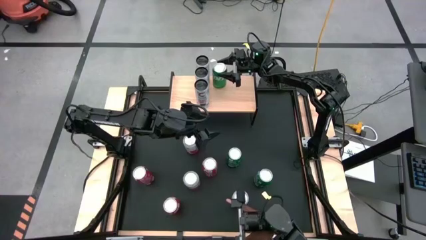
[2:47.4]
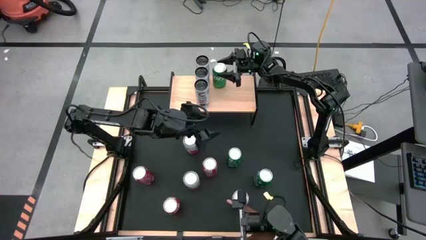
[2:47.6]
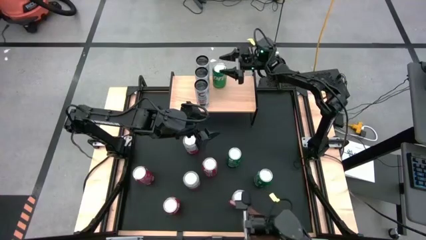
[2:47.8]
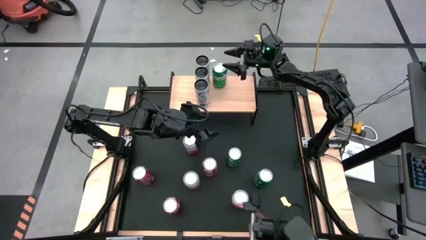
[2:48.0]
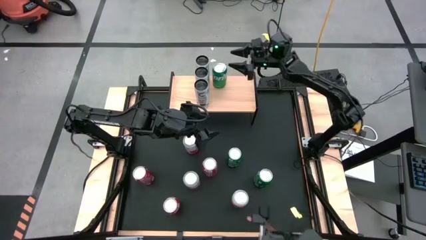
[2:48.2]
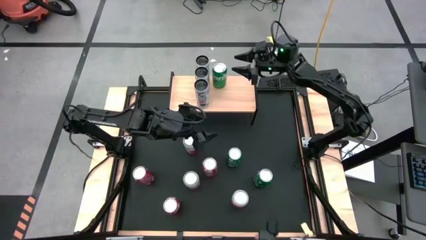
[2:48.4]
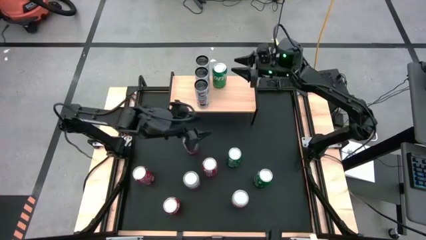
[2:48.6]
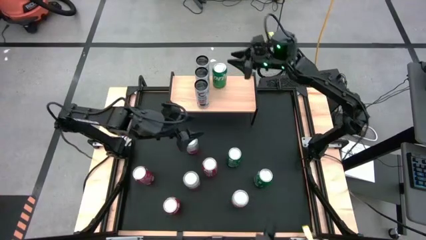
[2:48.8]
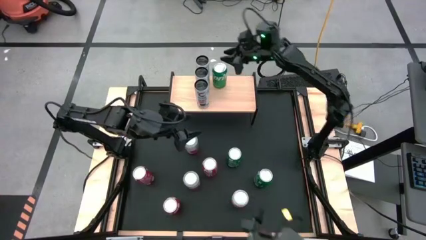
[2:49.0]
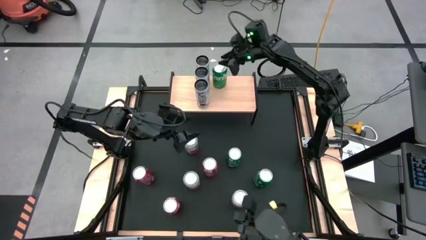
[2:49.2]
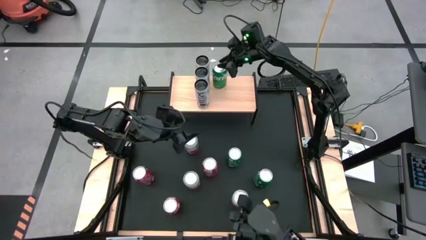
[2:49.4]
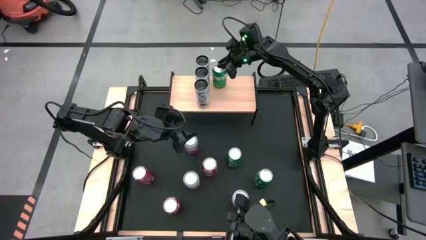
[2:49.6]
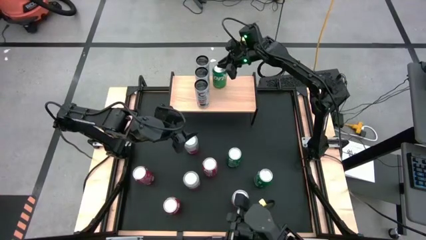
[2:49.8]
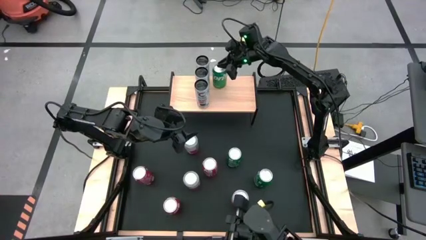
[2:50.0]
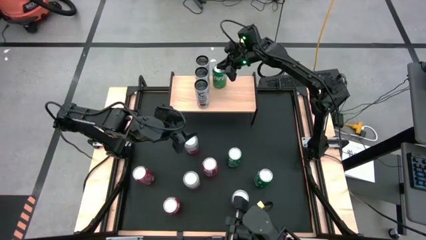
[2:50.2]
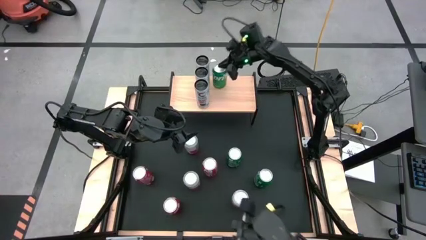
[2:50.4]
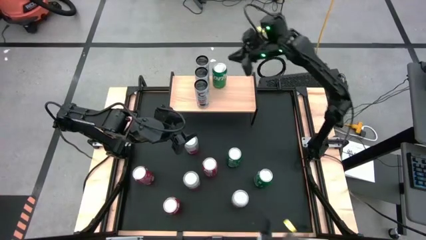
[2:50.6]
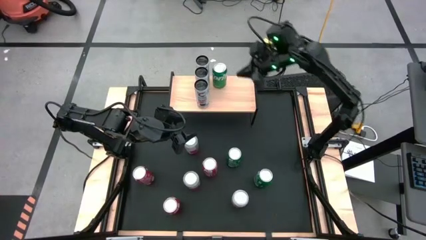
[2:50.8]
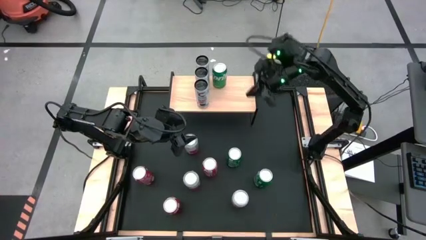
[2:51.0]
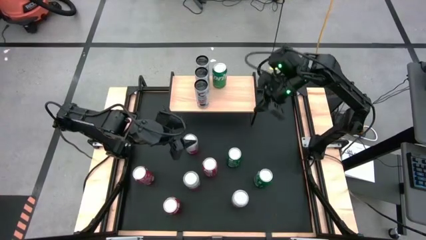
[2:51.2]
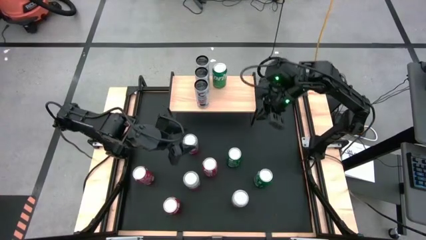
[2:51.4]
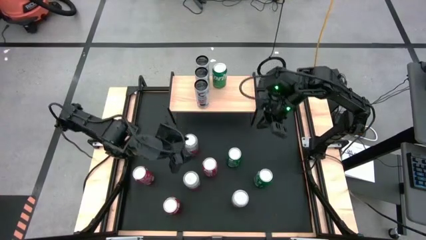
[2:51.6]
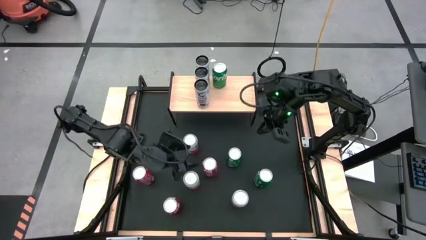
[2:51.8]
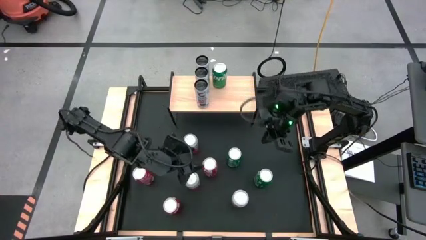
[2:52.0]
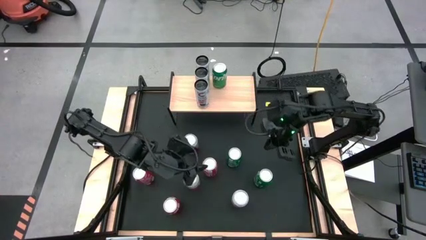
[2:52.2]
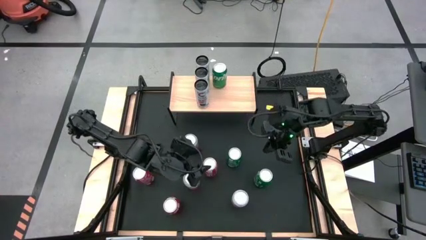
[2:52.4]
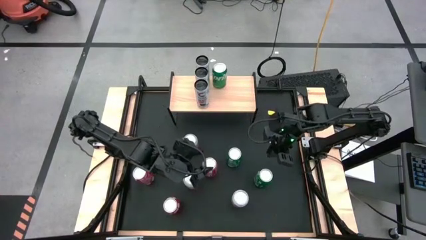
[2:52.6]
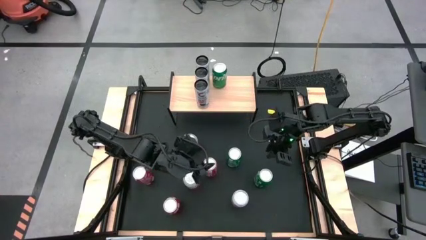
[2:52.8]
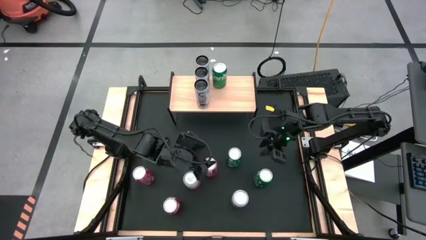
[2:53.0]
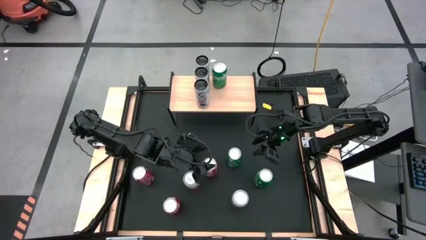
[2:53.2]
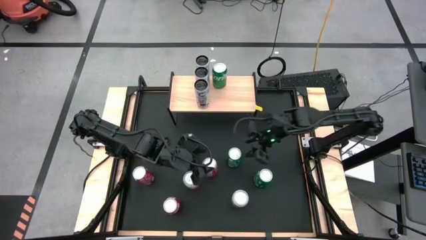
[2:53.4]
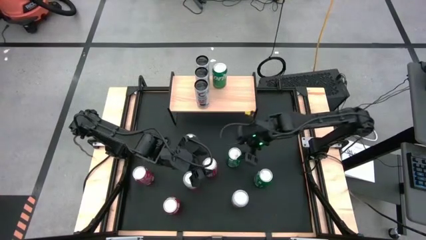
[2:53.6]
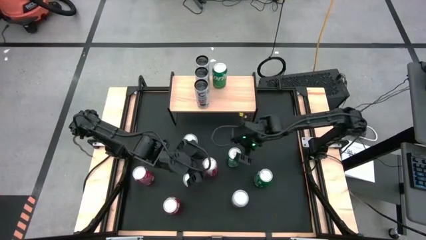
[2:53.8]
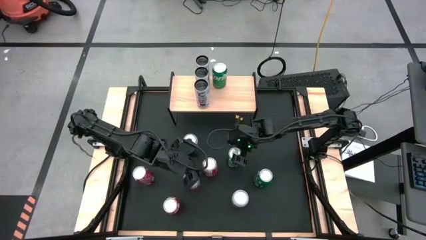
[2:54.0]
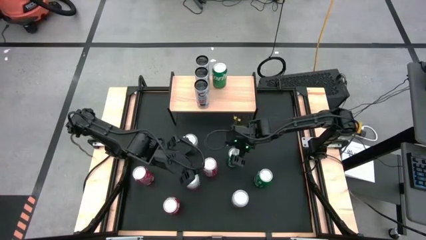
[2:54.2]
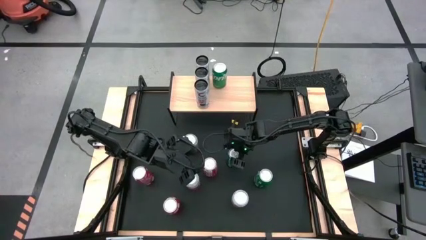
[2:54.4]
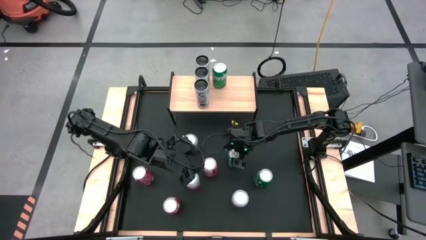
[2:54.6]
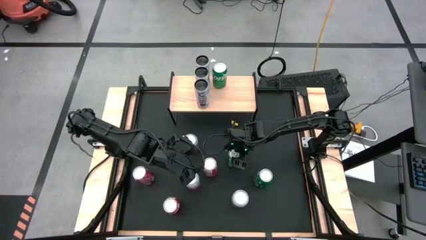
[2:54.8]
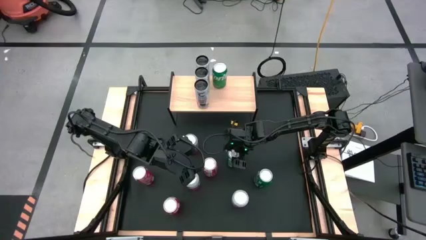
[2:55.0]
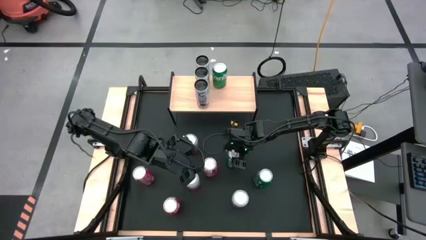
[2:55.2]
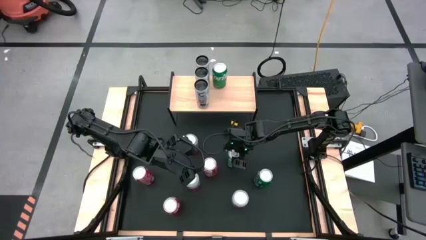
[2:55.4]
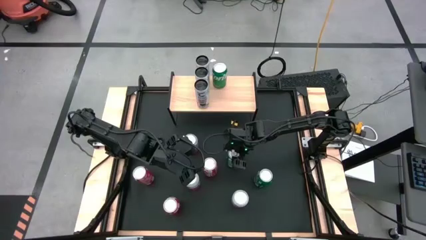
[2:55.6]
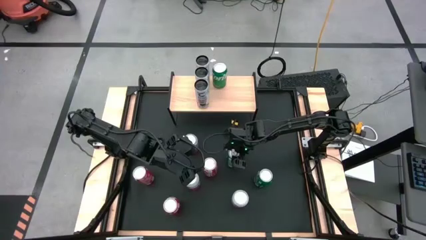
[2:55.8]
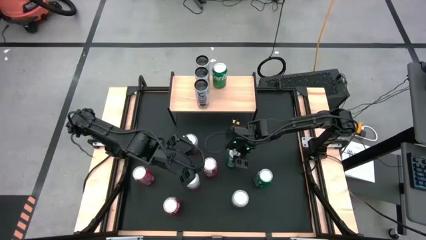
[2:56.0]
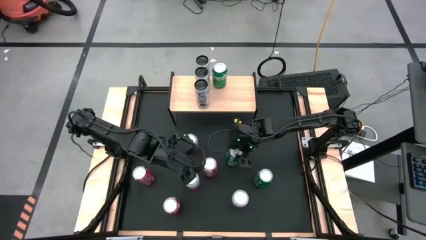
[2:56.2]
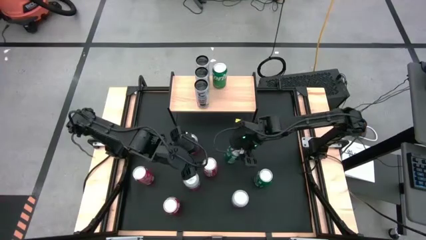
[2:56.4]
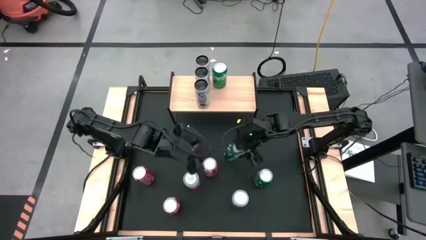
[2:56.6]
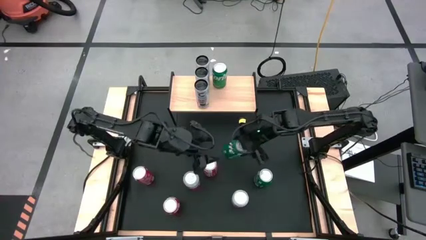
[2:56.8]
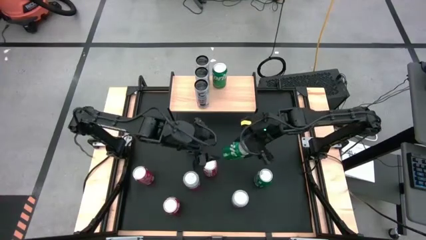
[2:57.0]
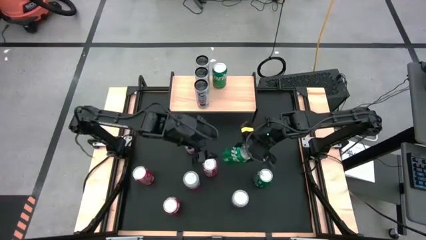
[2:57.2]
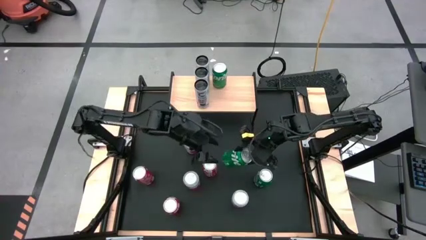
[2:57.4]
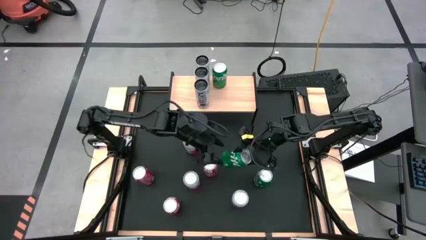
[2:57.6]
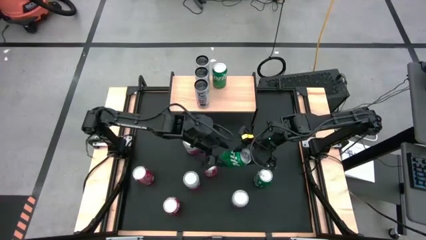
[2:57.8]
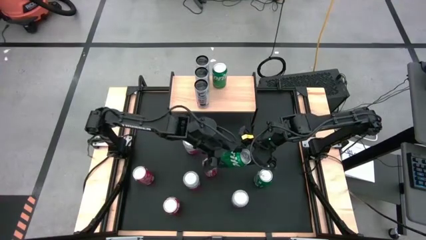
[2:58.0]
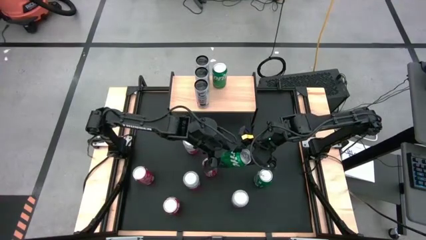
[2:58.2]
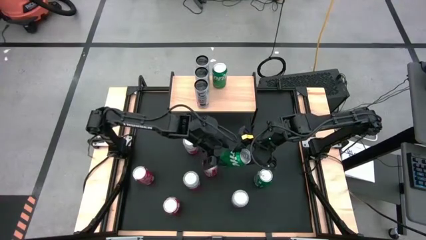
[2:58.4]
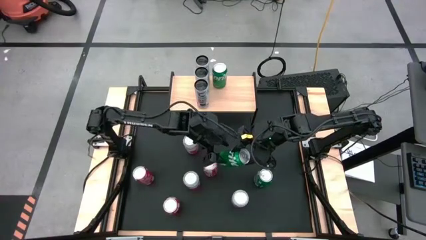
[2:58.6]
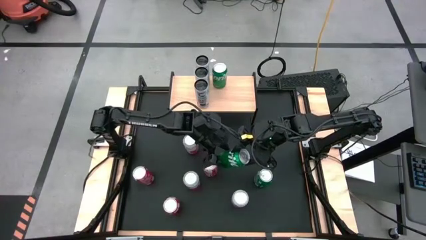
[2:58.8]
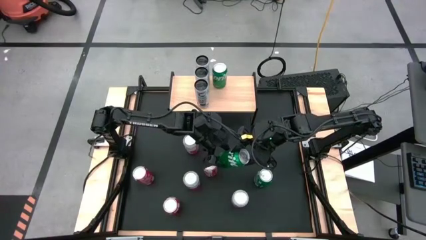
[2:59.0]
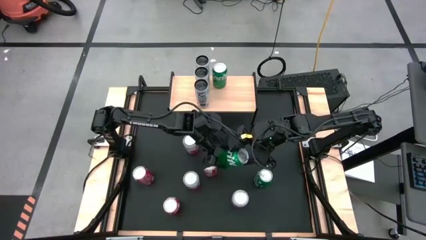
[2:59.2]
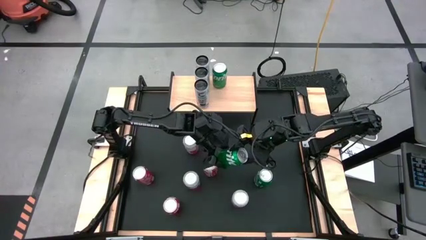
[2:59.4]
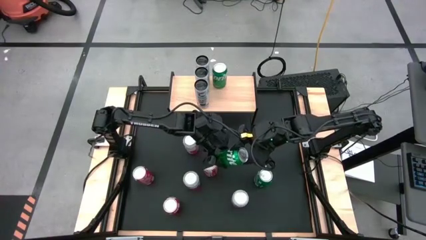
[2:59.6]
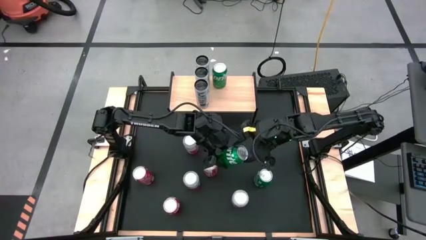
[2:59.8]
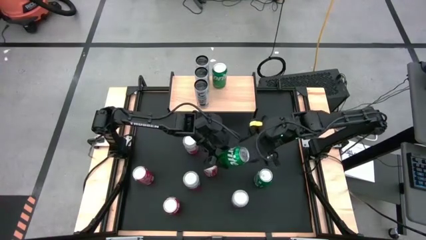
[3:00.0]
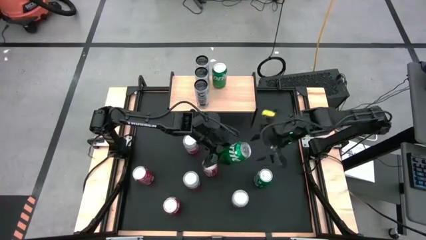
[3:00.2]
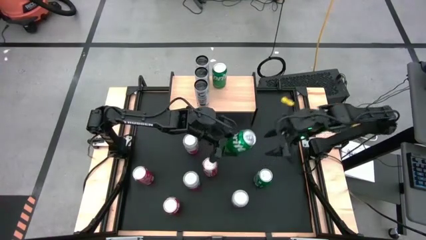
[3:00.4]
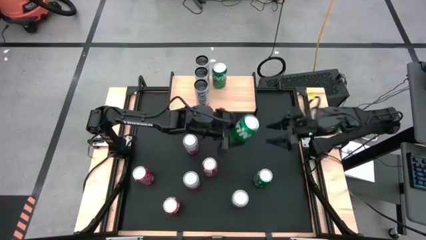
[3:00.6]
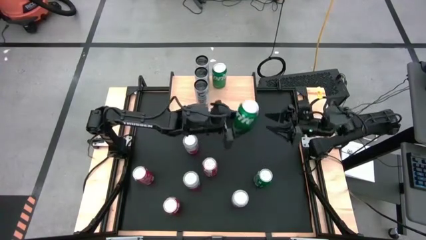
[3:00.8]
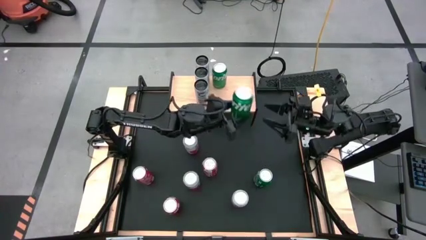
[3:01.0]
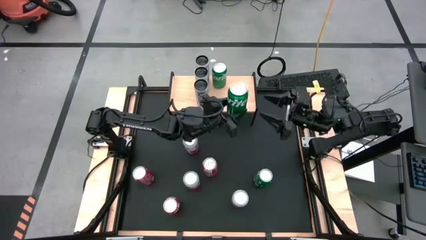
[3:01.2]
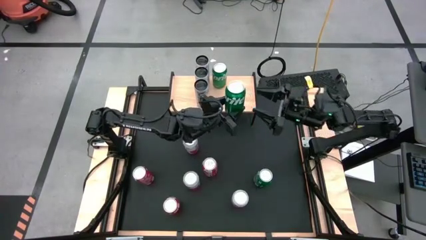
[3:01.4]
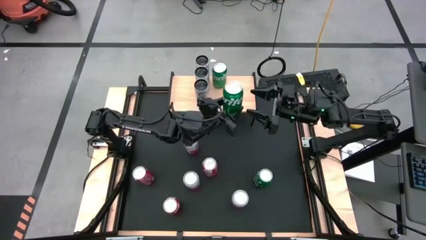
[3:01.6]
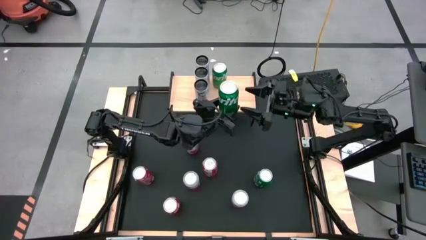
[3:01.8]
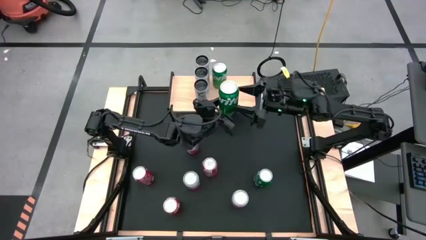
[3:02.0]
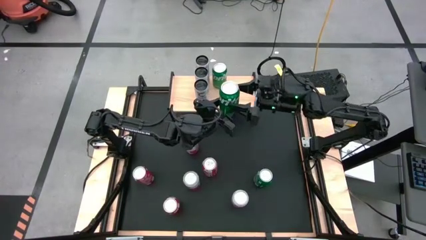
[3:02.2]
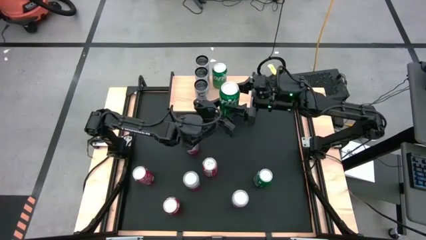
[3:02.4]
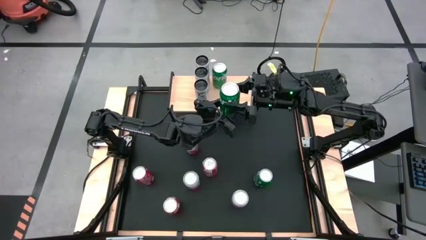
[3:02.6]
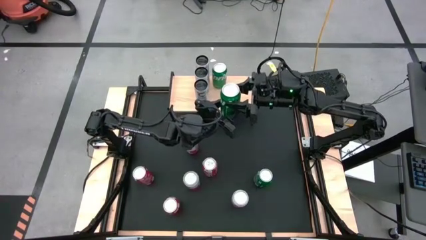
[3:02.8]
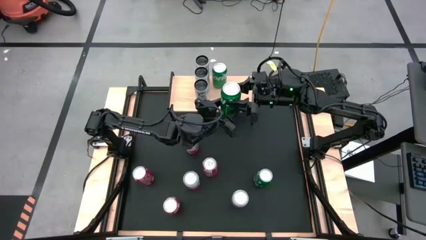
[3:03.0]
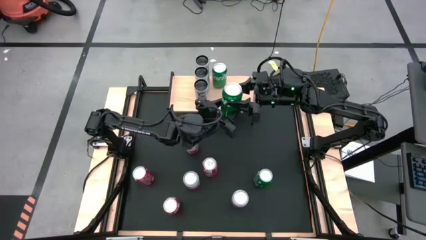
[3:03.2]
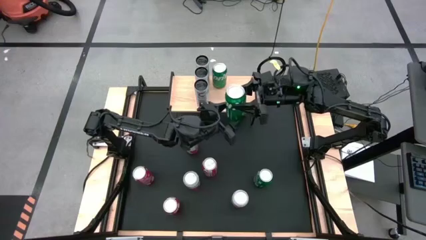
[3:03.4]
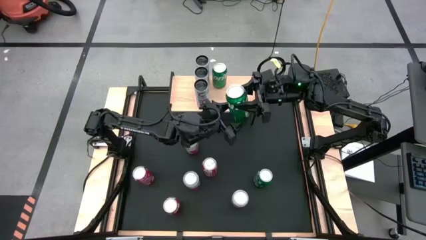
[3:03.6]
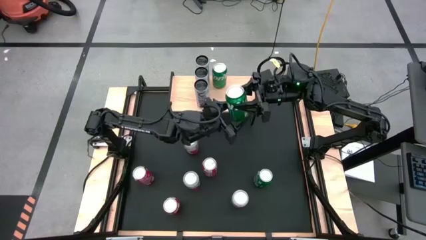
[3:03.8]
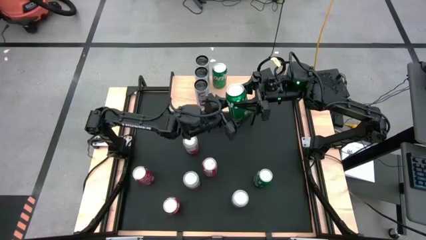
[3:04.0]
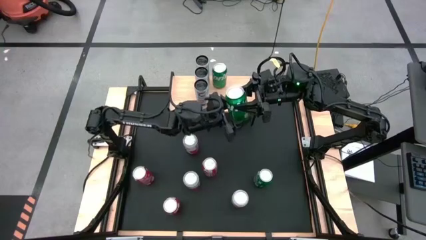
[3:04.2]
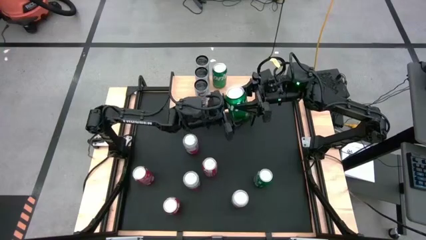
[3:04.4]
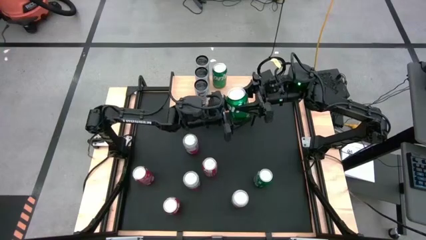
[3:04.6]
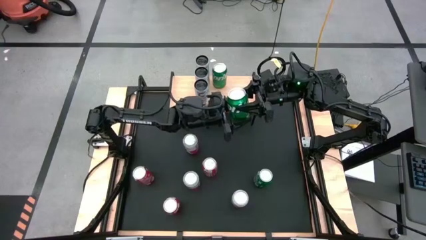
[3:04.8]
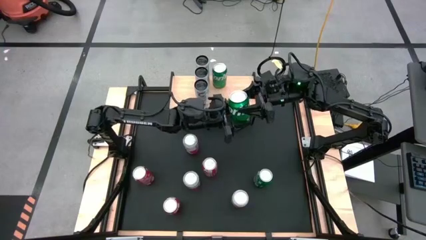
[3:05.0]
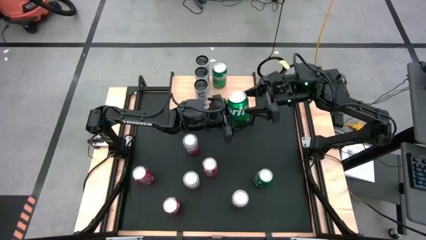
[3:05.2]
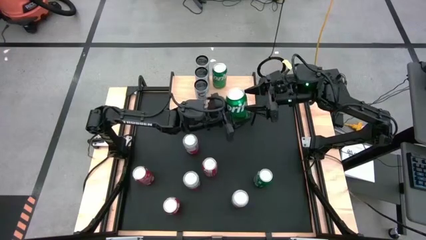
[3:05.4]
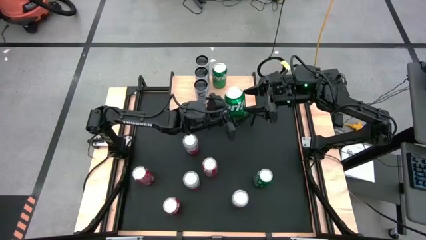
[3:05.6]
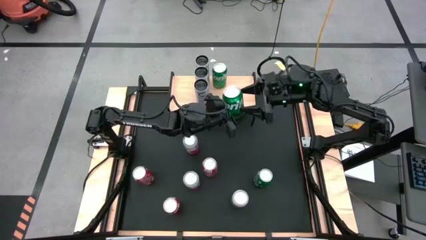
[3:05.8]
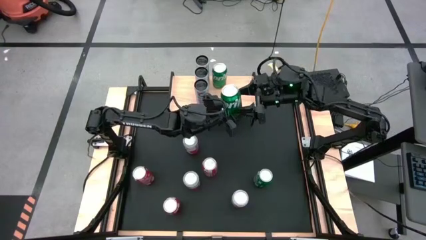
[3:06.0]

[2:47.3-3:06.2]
Task: Place canned beverage on shelf
Put the top green soda can aligned with the other green soda can on the shelf
